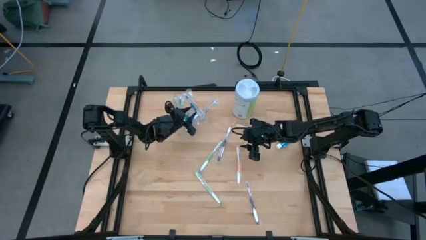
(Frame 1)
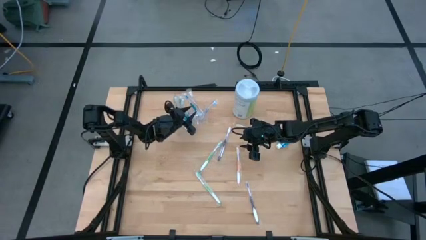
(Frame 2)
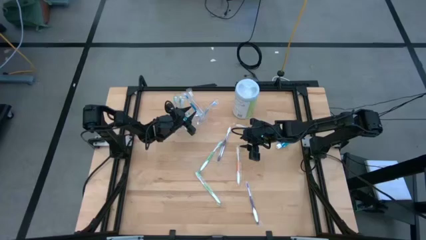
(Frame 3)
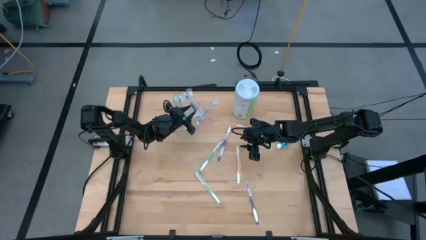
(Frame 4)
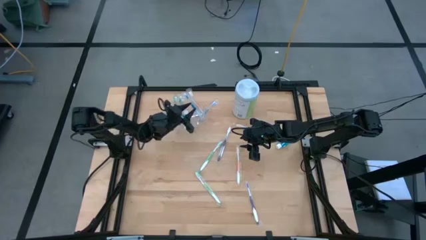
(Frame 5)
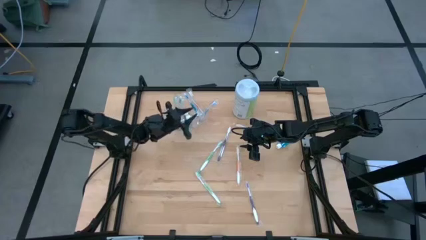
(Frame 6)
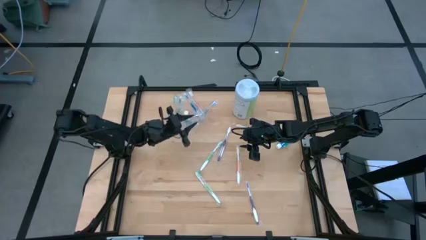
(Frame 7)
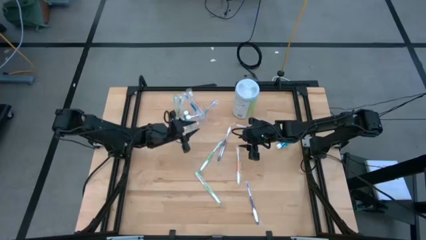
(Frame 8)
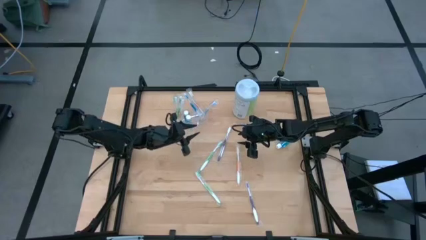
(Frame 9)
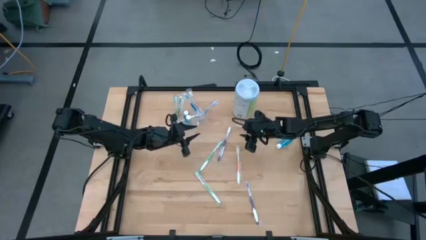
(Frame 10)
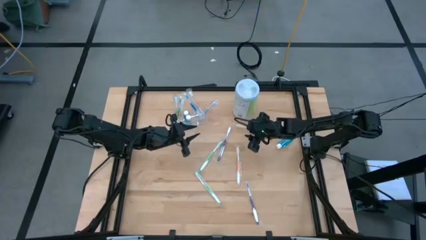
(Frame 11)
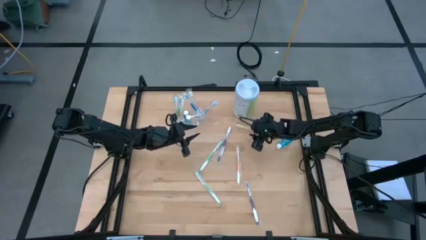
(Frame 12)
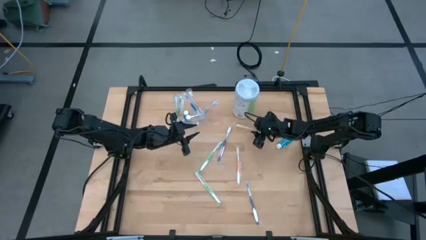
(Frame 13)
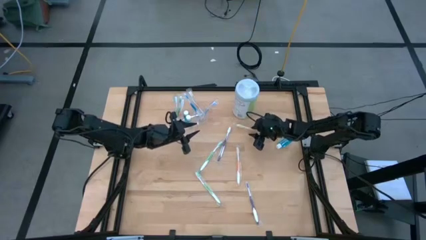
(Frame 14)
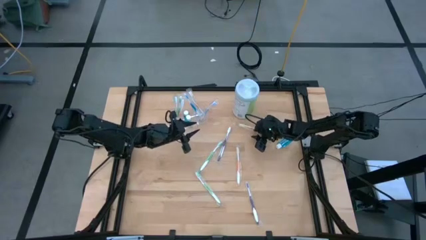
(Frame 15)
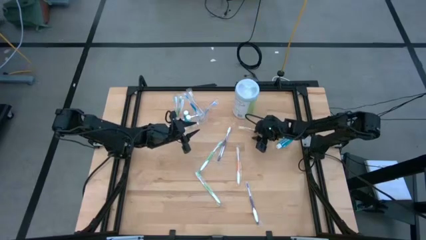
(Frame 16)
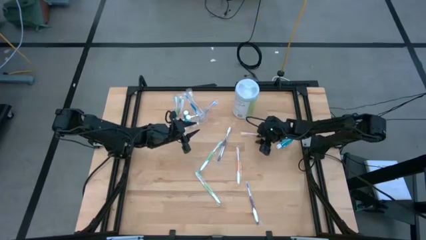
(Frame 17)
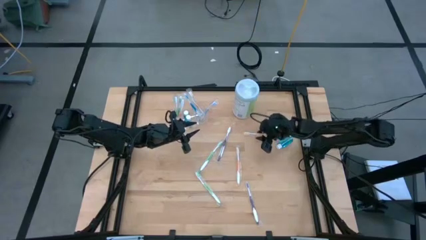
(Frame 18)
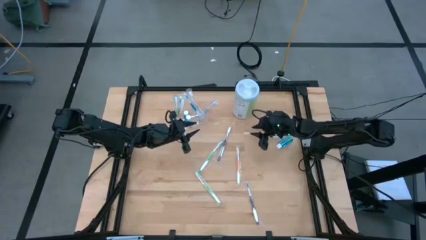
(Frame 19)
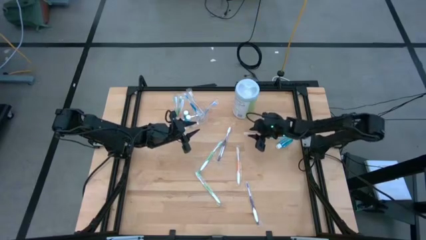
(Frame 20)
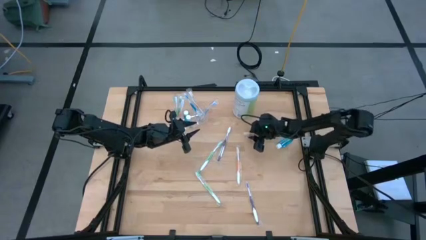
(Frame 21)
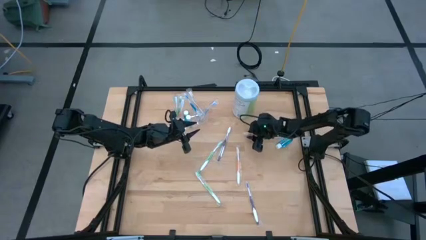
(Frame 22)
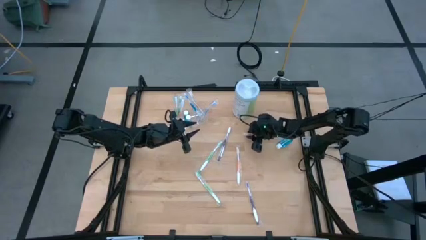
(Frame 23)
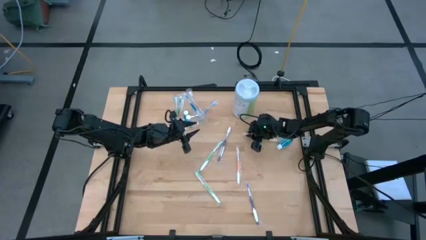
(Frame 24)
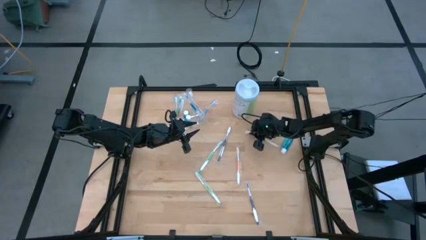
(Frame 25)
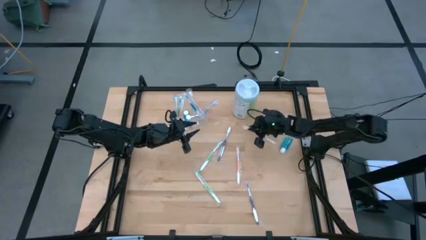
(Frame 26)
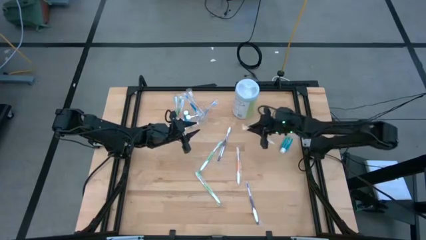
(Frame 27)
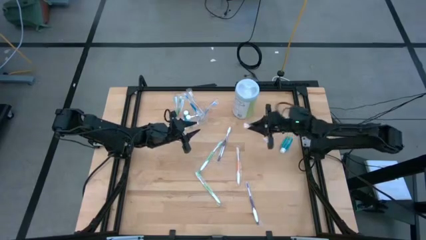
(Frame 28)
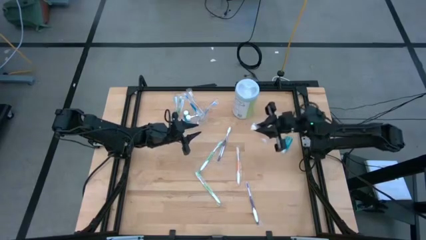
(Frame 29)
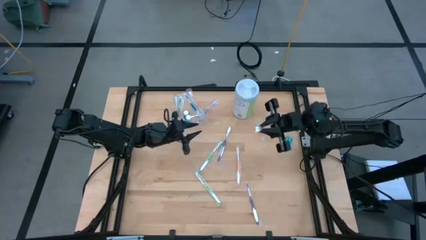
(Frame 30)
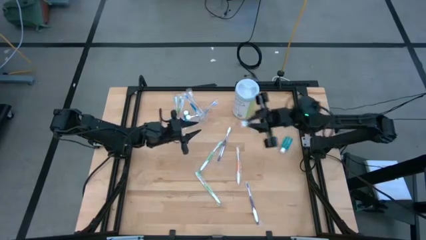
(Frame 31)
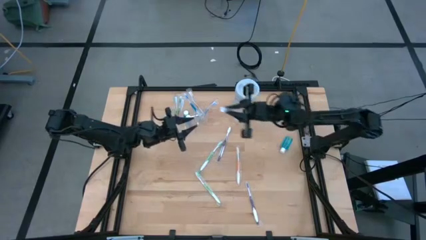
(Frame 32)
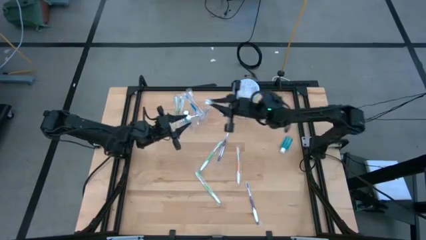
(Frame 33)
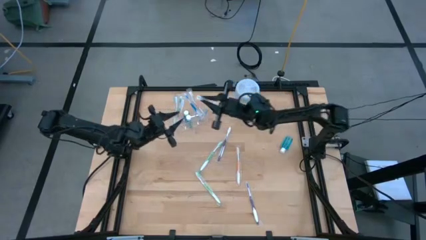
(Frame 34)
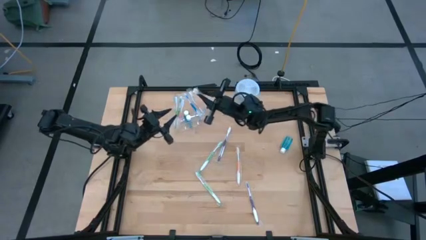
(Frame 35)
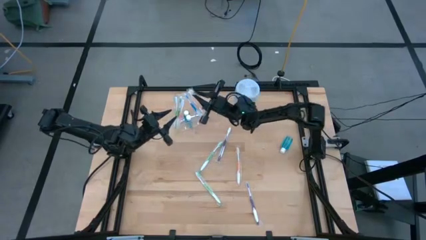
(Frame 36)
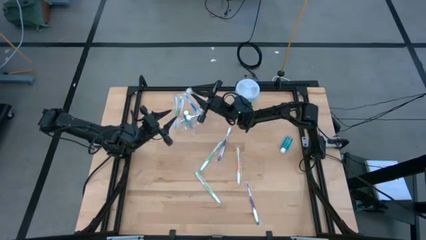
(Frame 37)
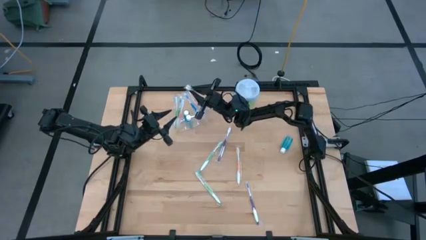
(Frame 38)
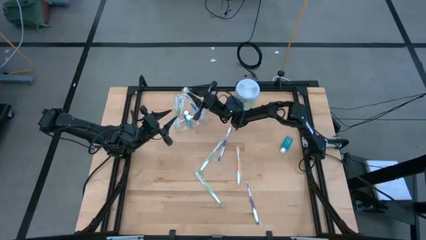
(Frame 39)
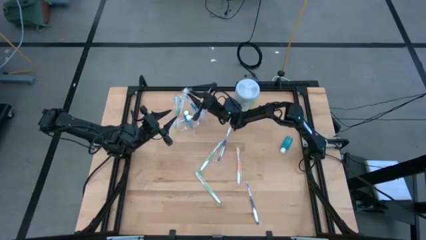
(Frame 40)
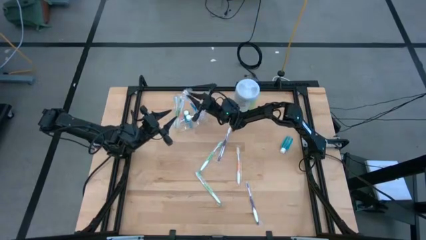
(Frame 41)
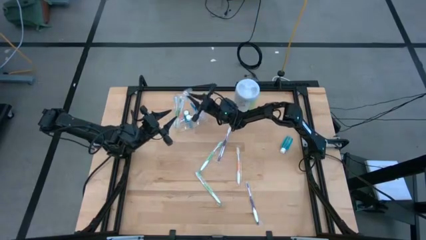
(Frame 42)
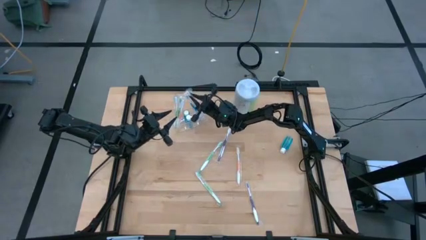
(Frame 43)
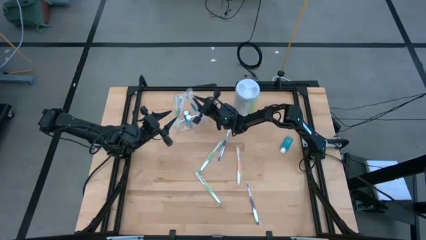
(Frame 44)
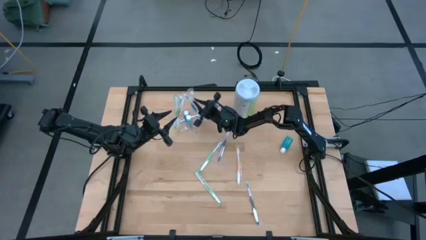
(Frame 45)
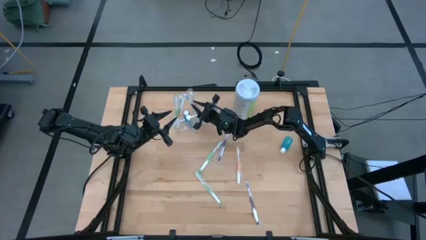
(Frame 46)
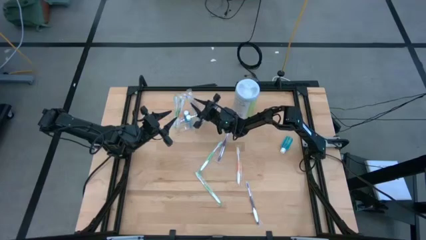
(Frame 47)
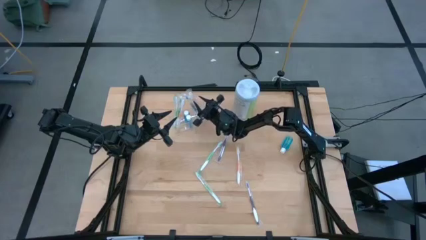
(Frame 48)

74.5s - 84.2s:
Task: Pick & Place toothbrushing station
Put the orange toothbrush into the transparent organizer

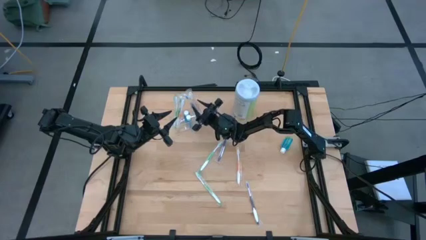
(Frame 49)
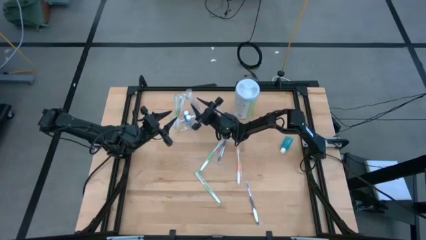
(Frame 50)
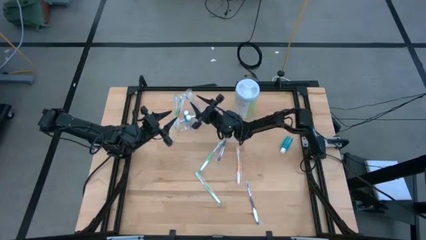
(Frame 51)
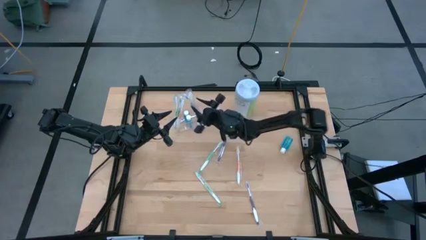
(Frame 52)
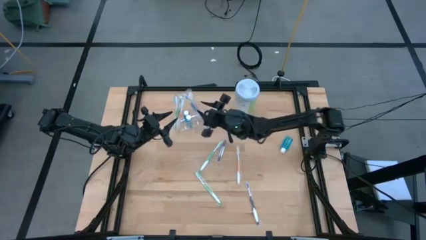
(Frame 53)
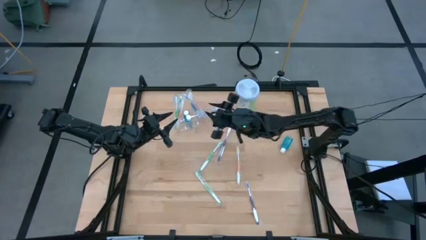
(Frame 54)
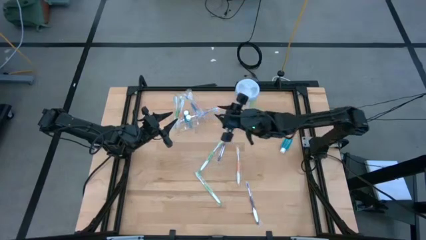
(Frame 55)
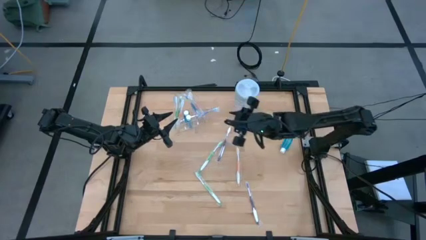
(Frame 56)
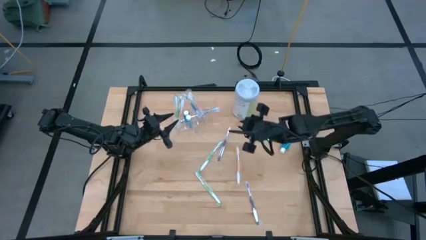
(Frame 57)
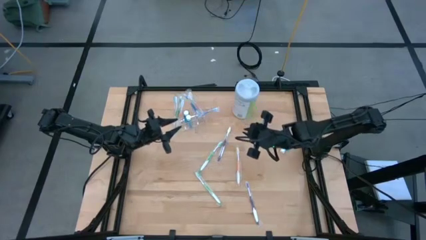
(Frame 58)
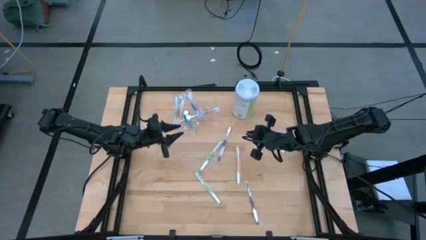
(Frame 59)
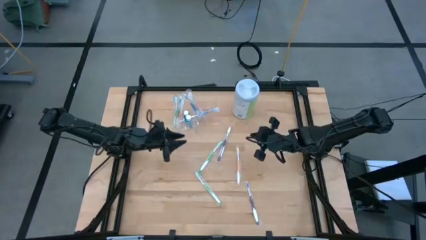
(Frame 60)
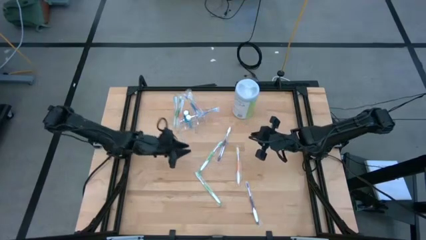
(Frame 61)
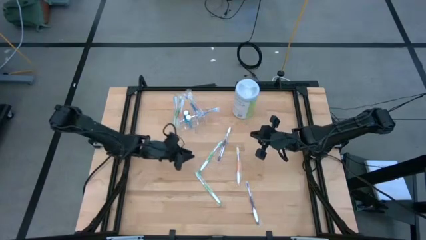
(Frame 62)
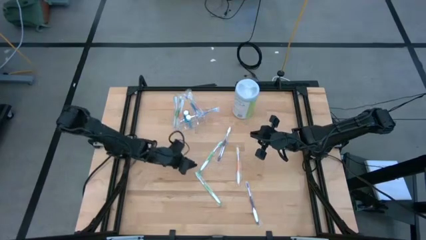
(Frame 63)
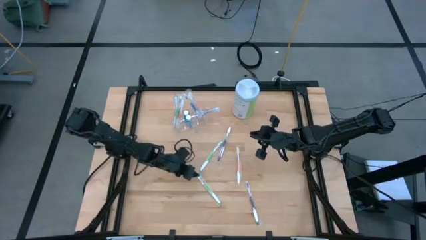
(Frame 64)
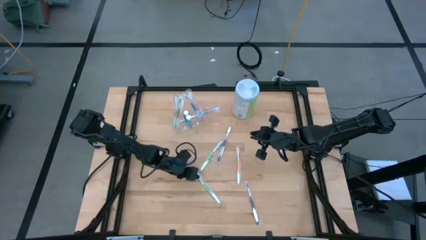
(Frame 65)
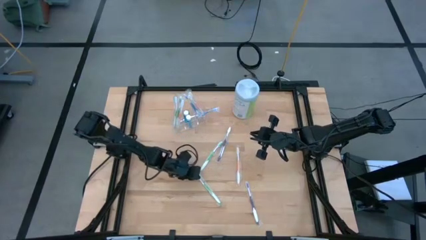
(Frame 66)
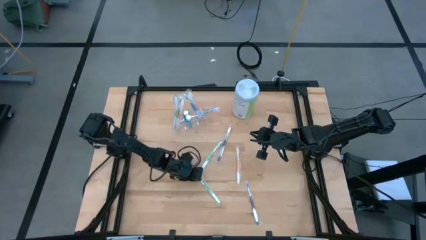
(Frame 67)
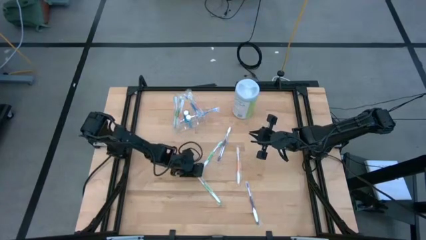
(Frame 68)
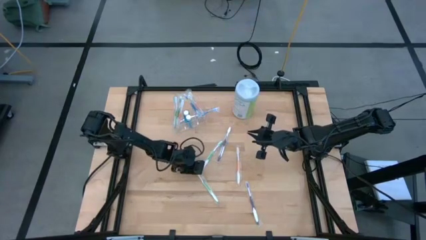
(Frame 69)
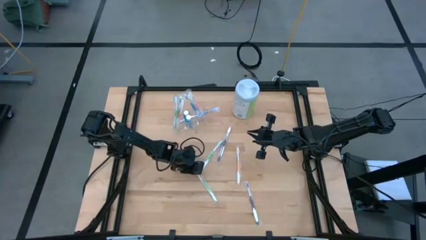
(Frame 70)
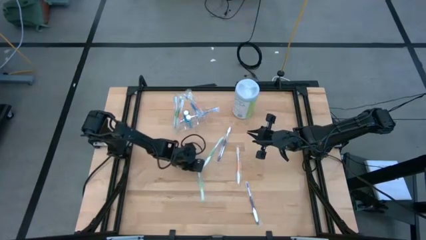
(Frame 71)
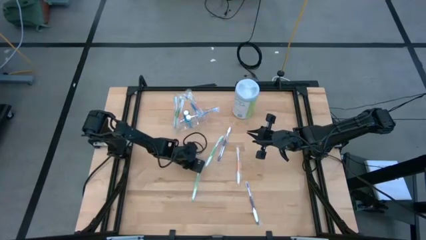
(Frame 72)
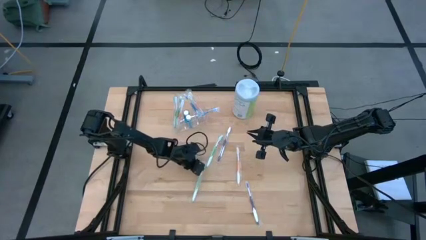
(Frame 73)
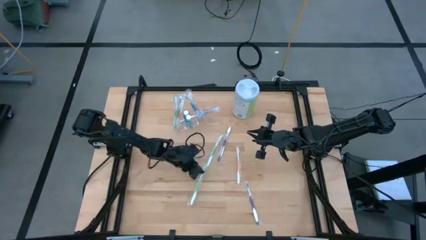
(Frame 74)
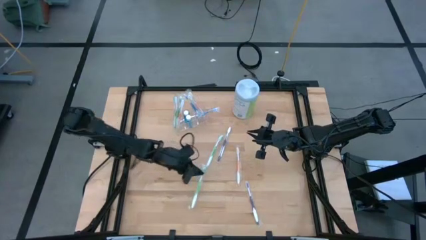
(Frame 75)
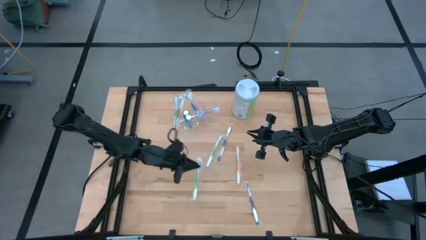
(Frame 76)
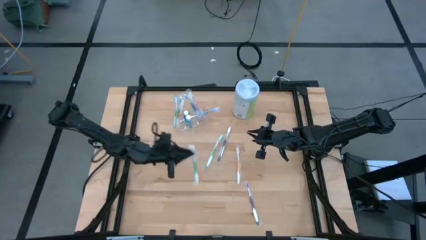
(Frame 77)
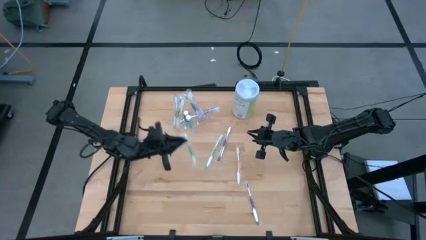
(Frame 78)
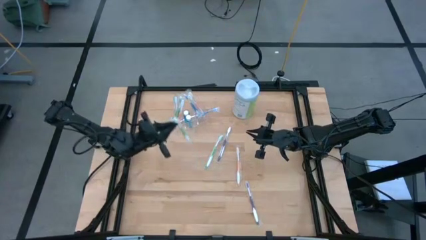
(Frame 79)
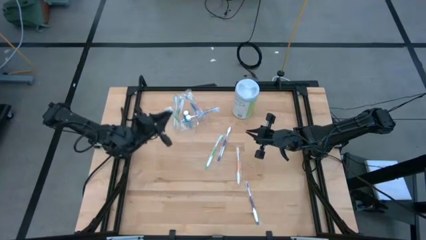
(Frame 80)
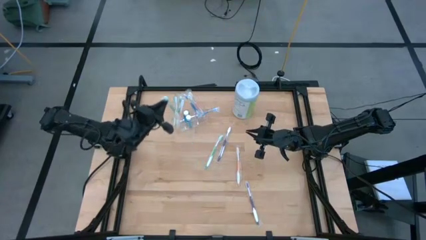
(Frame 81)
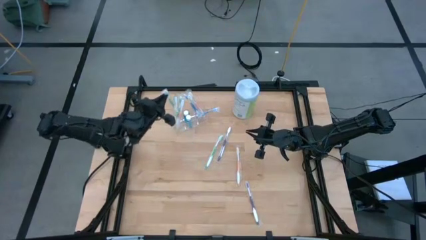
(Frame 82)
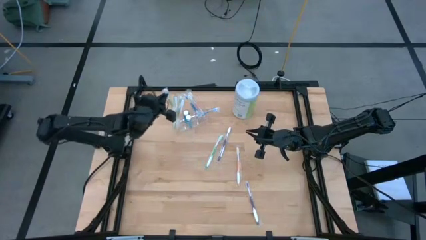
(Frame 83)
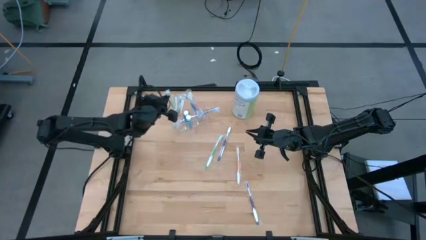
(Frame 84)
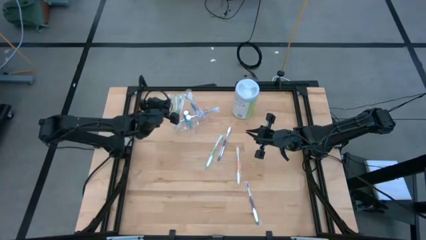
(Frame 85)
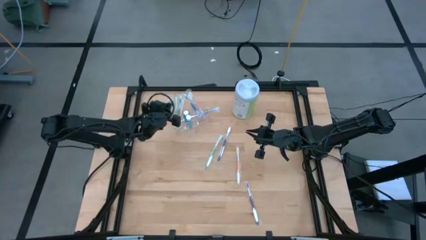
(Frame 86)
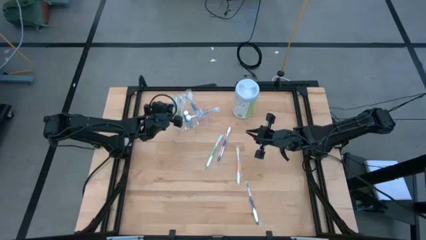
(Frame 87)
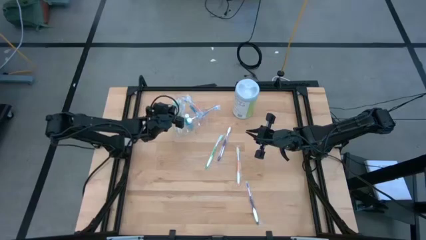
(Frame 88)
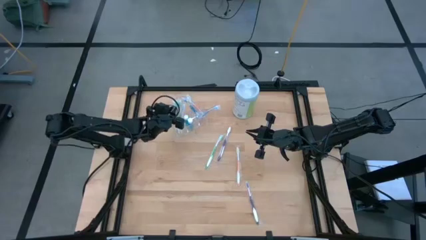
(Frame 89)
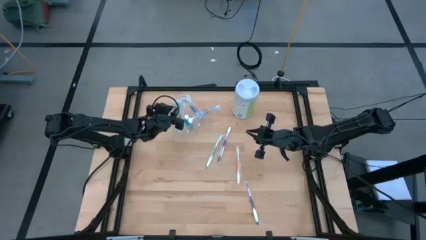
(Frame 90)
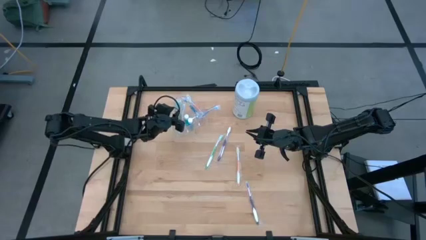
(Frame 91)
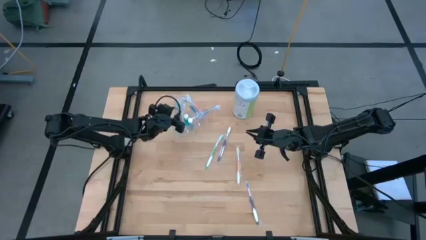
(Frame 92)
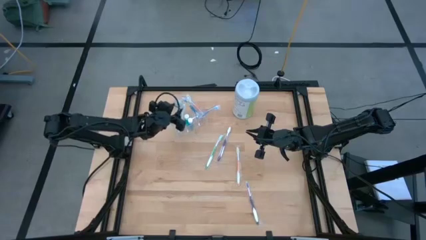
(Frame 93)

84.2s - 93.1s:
Put the green toothbrush into the transparent organizer
